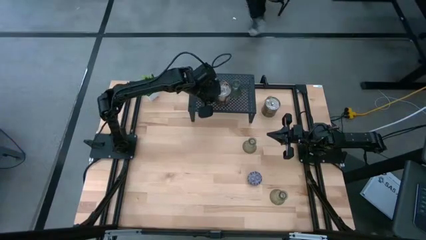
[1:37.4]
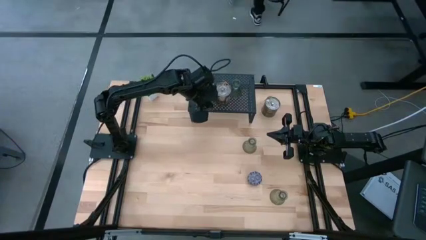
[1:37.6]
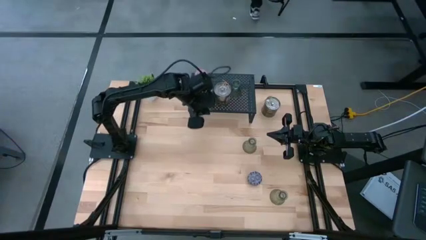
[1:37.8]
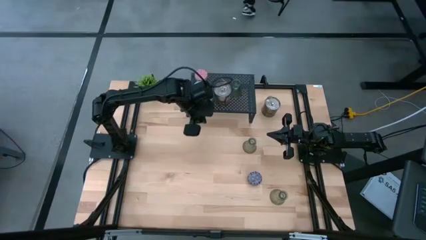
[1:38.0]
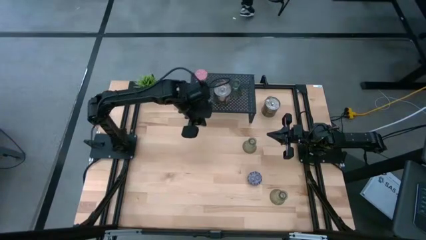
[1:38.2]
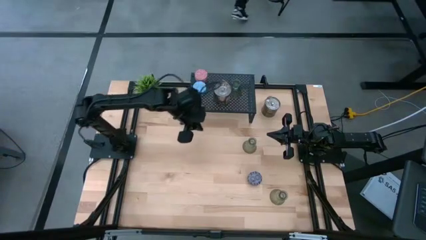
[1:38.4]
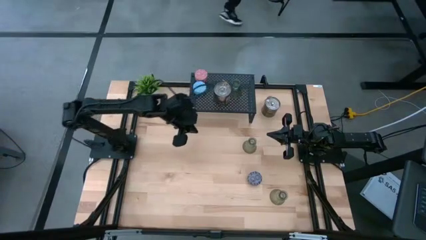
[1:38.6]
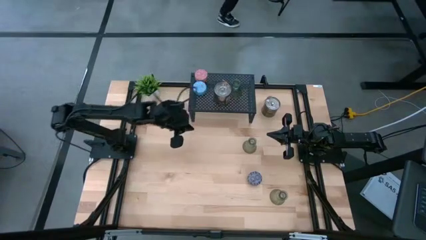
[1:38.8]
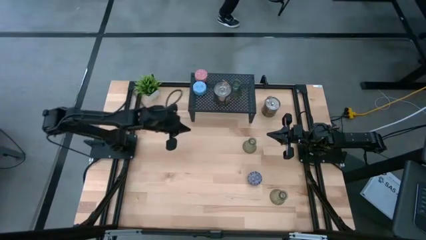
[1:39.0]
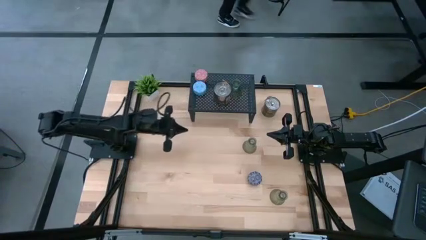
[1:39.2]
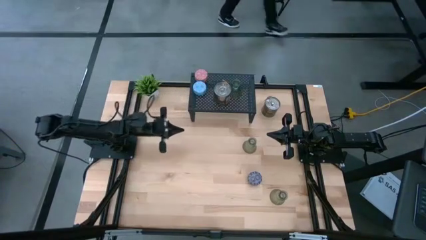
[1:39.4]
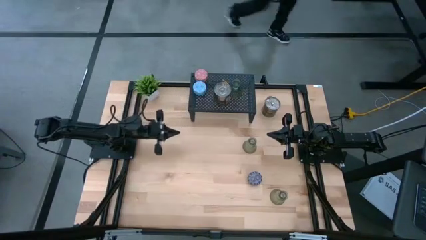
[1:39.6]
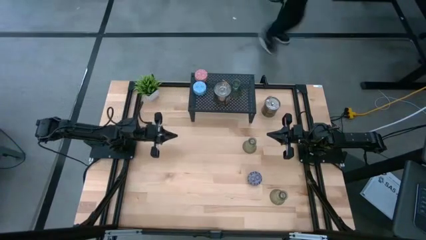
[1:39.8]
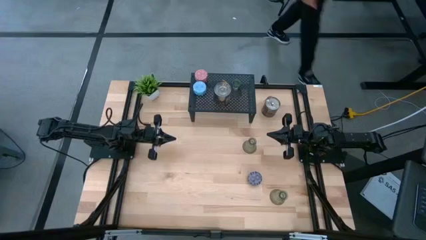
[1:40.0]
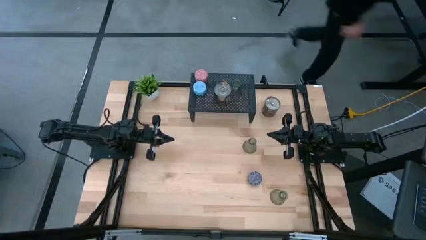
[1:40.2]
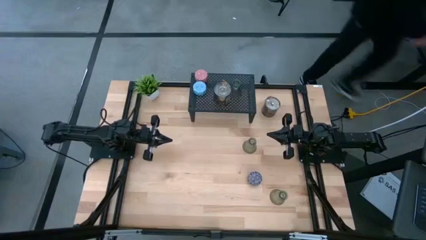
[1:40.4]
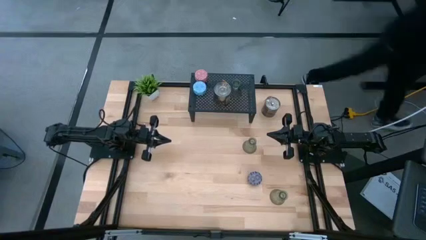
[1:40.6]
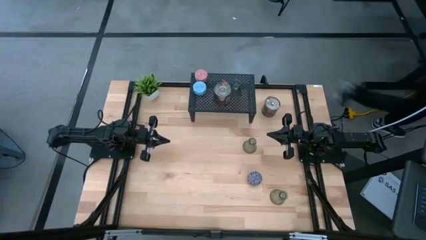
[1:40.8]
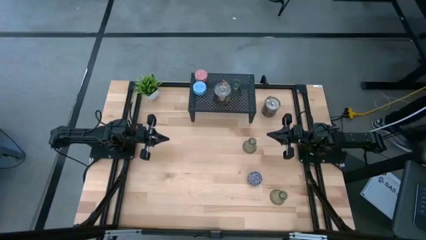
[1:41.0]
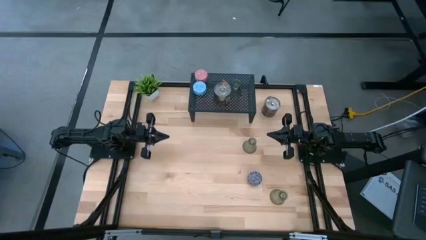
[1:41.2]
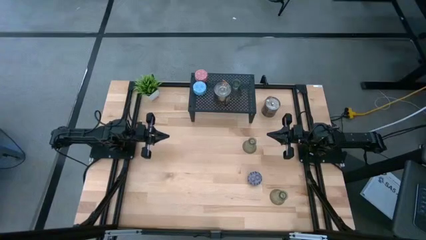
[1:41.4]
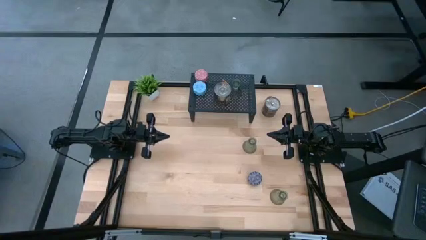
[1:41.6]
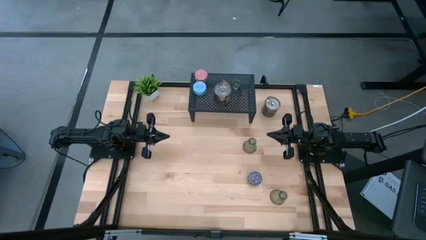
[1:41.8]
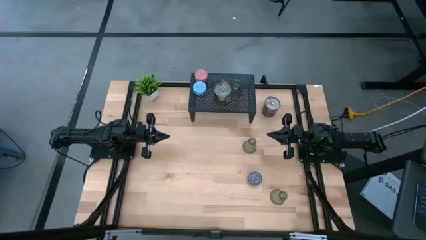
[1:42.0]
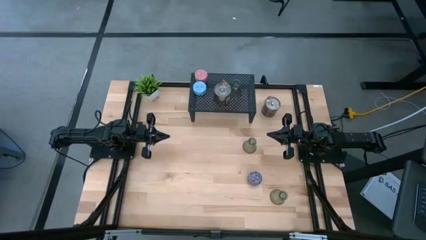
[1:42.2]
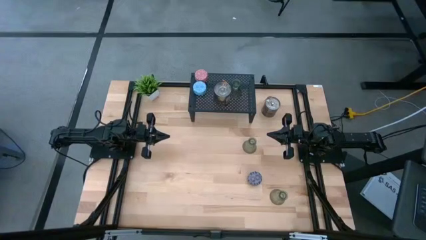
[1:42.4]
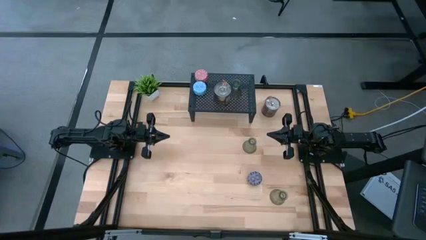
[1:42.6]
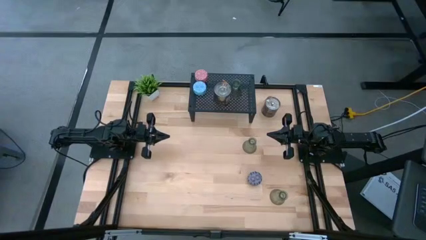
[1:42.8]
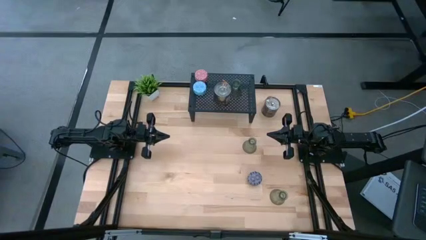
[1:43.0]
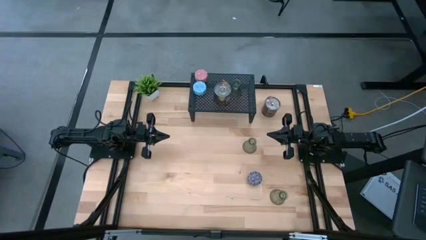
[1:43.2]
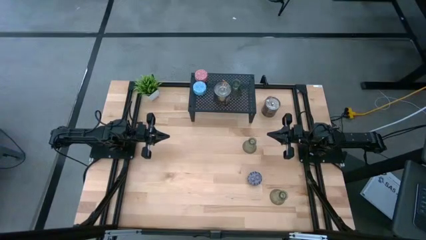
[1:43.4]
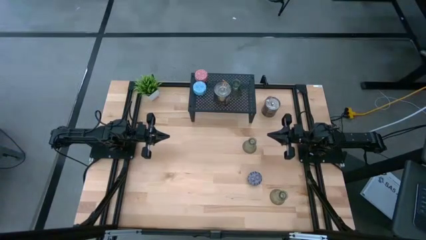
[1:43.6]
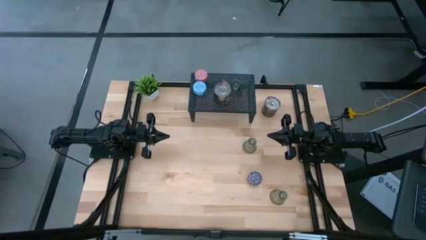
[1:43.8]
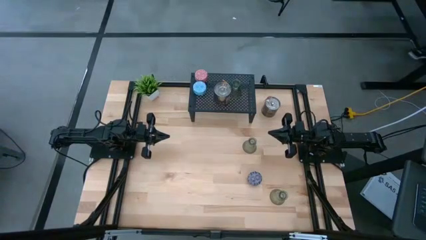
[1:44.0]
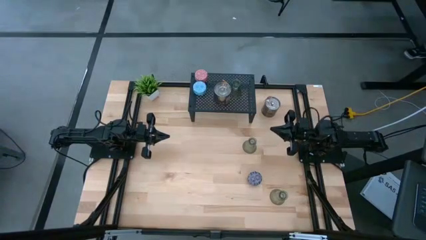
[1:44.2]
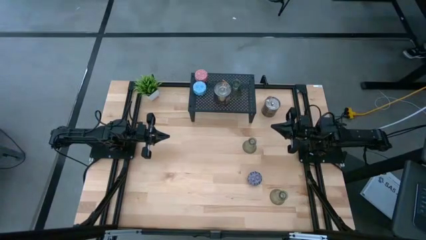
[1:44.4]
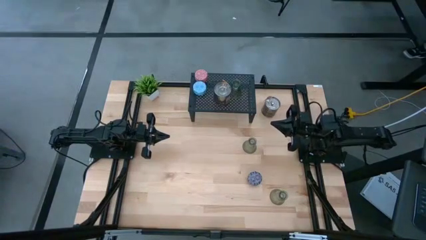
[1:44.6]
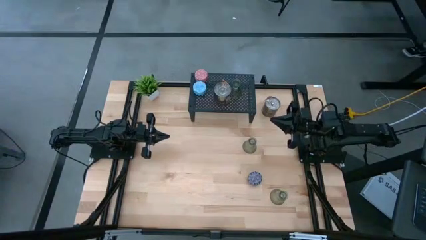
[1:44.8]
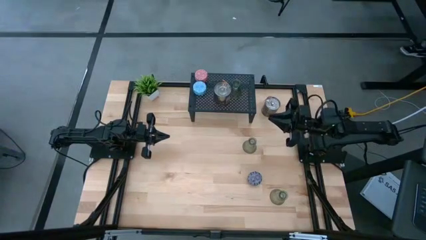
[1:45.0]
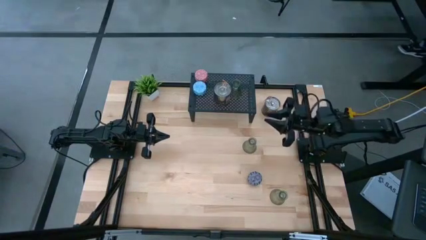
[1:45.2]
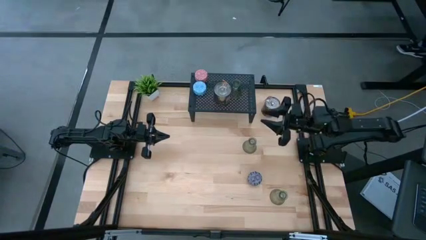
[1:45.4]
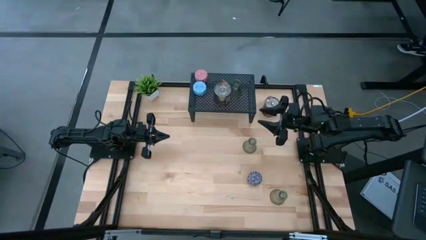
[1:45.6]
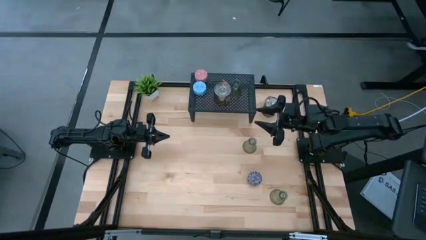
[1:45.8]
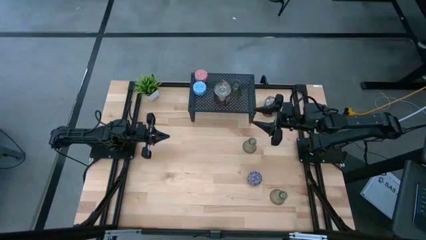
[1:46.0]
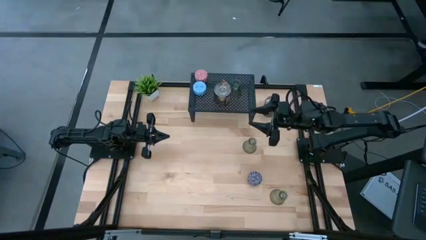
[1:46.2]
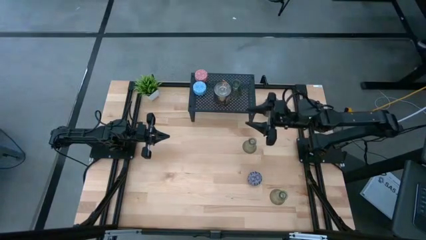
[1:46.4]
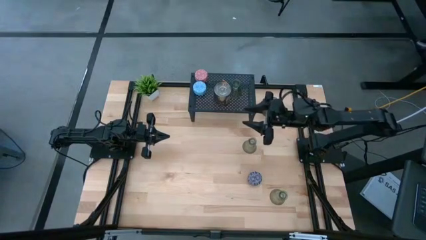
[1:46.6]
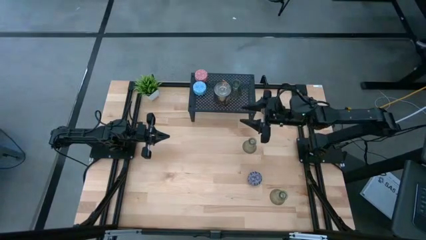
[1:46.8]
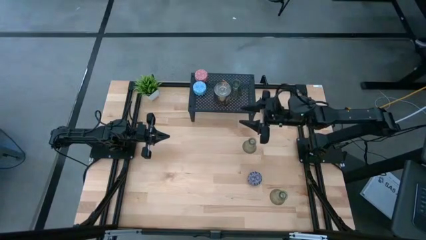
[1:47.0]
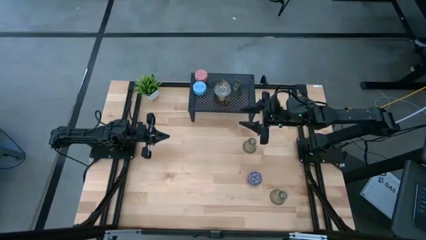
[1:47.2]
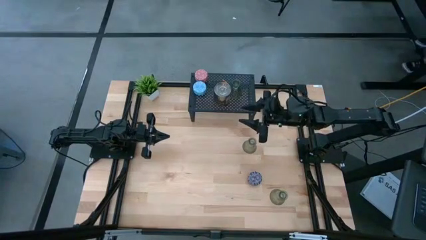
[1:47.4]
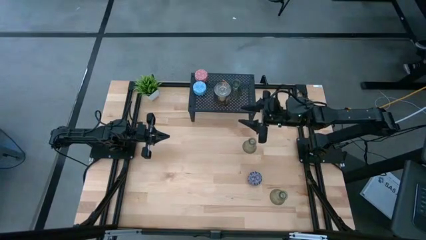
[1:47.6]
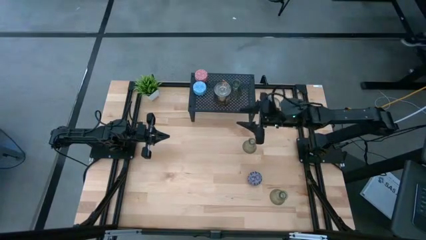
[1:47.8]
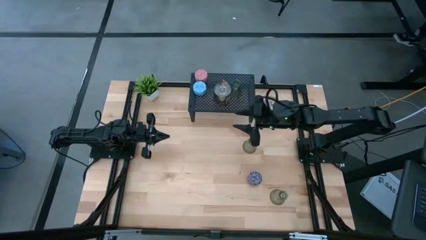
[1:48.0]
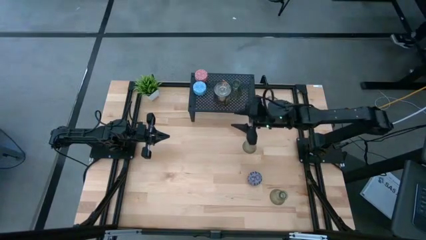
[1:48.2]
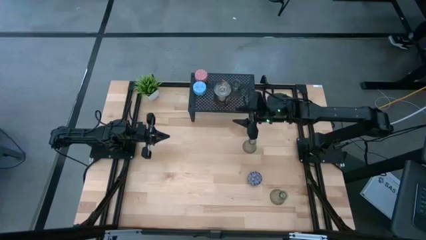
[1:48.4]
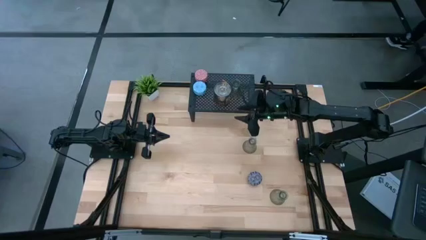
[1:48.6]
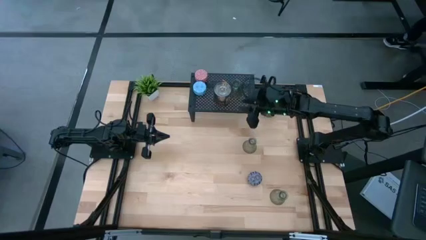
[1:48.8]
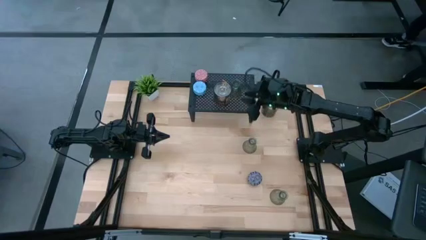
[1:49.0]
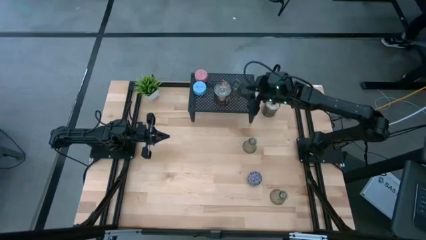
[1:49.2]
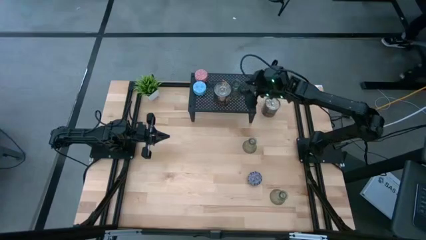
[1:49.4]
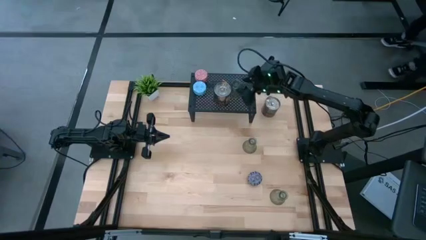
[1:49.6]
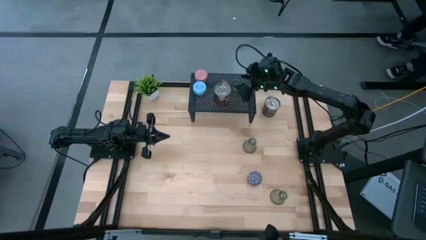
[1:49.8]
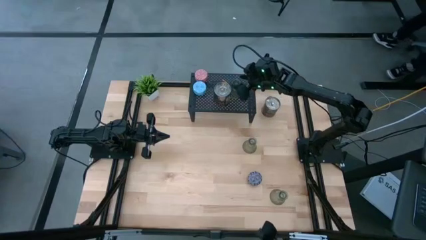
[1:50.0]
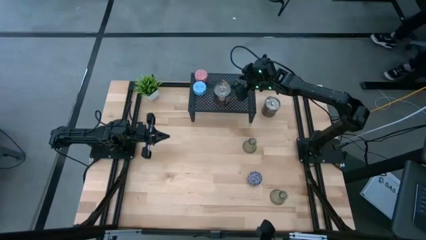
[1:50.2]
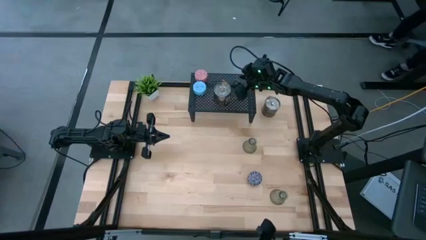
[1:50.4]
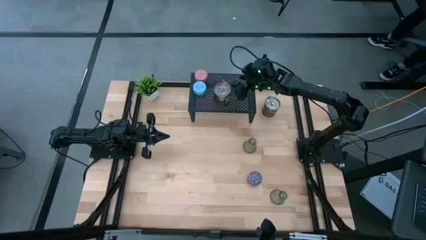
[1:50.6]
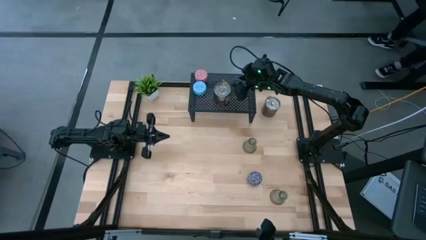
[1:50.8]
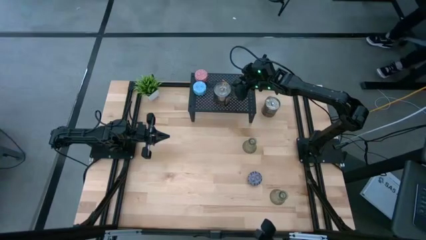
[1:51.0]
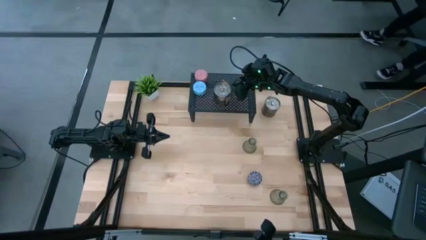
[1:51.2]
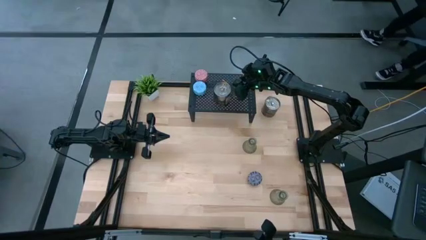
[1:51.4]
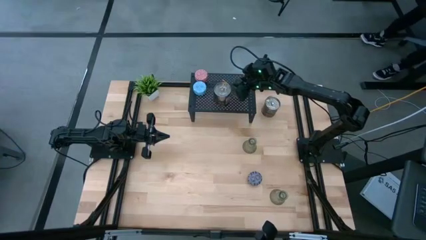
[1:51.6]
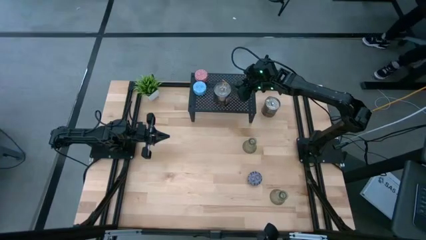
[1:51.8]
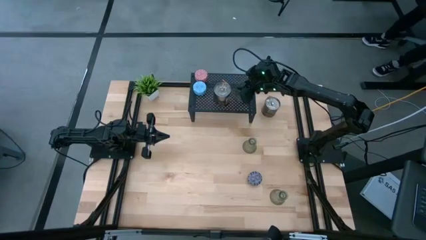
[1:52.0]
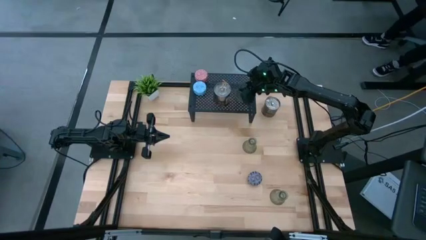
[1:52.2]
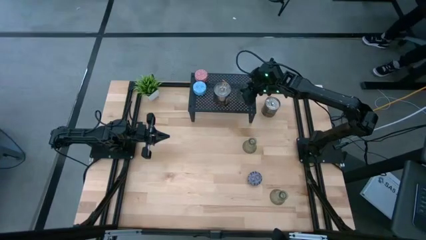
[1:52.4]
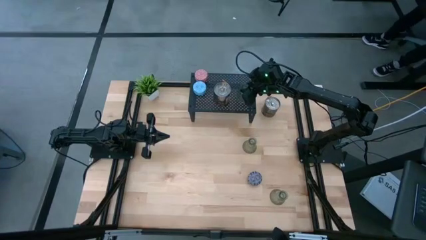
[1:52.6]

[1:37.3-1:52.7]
Task: Pick & Place candle stick holders
Adjust the green candle holder on the shelf
